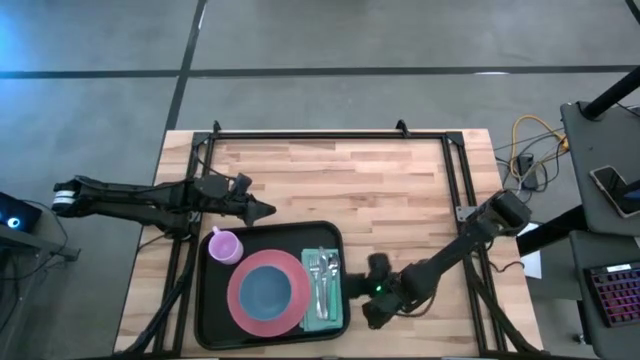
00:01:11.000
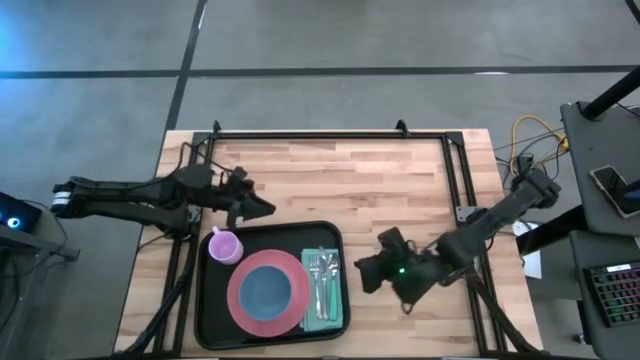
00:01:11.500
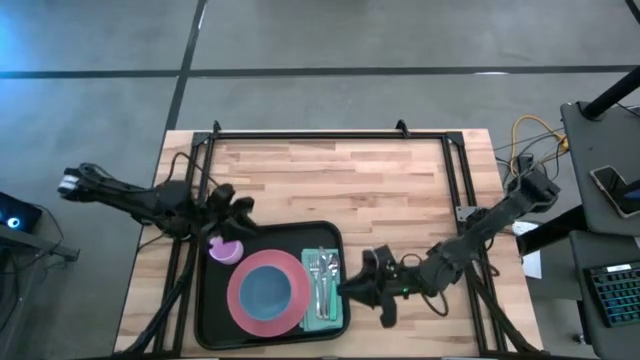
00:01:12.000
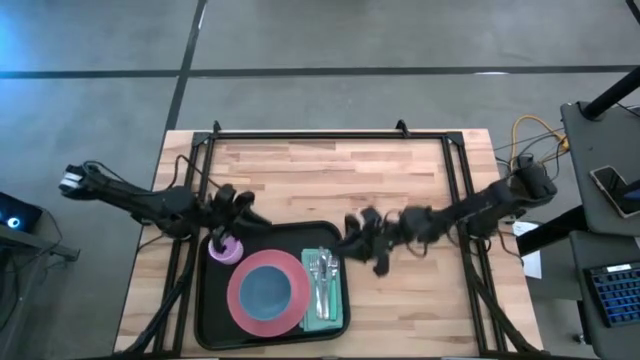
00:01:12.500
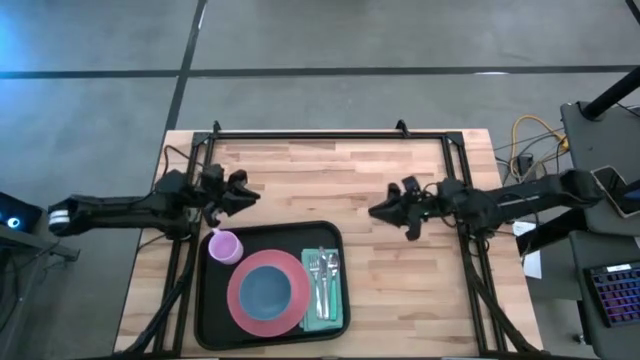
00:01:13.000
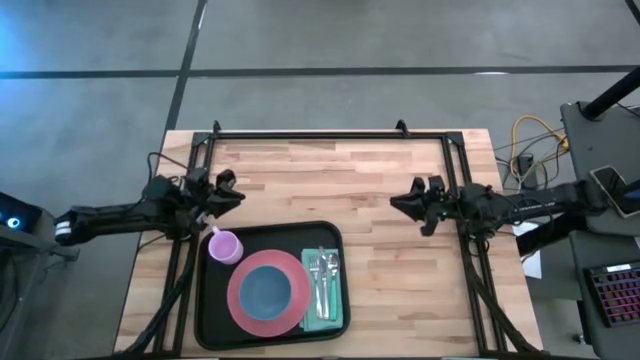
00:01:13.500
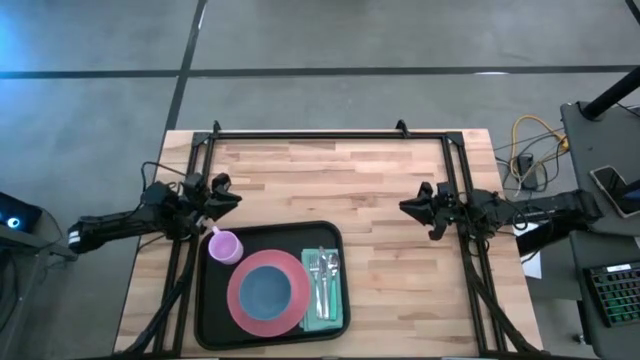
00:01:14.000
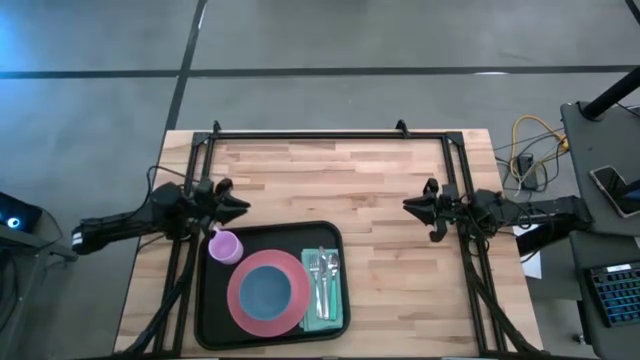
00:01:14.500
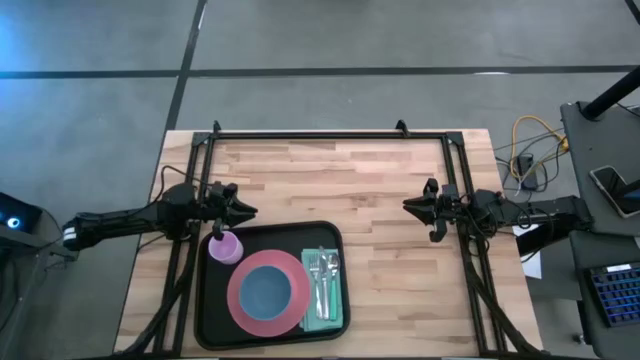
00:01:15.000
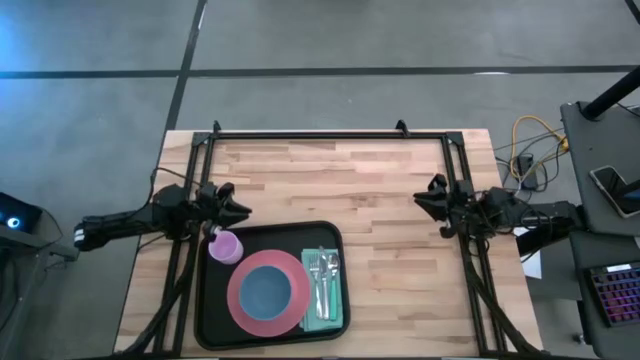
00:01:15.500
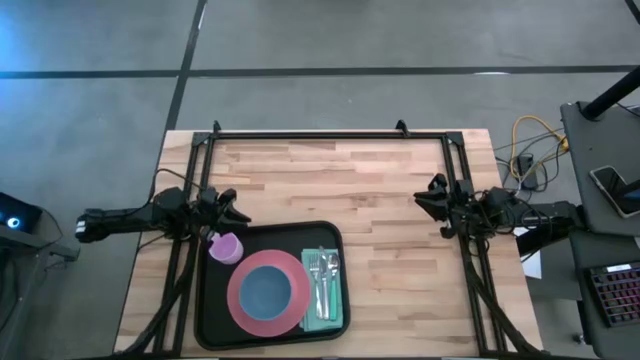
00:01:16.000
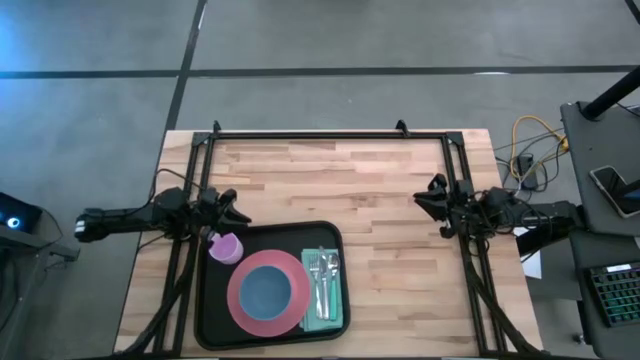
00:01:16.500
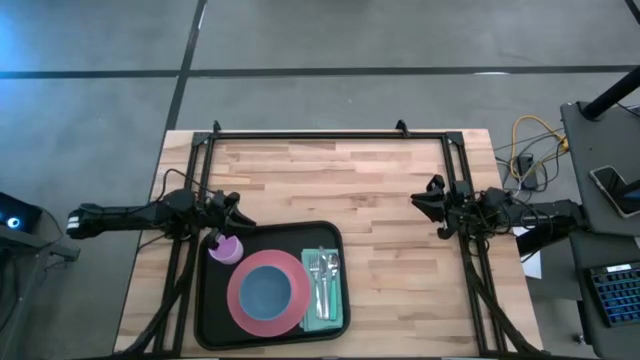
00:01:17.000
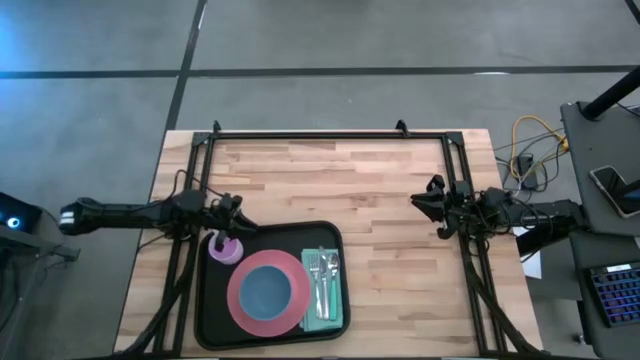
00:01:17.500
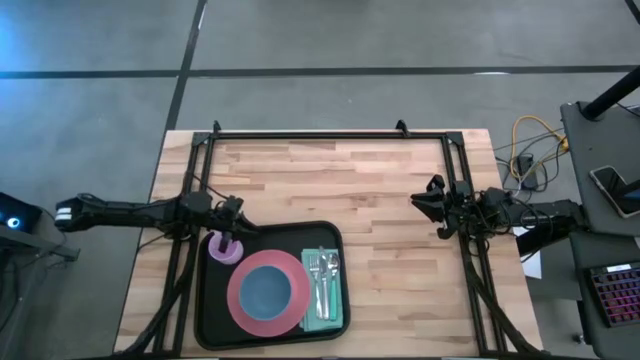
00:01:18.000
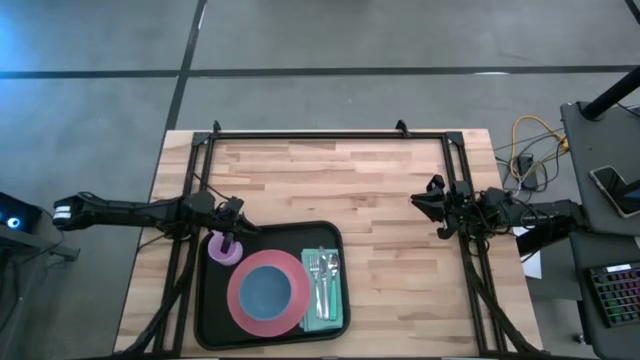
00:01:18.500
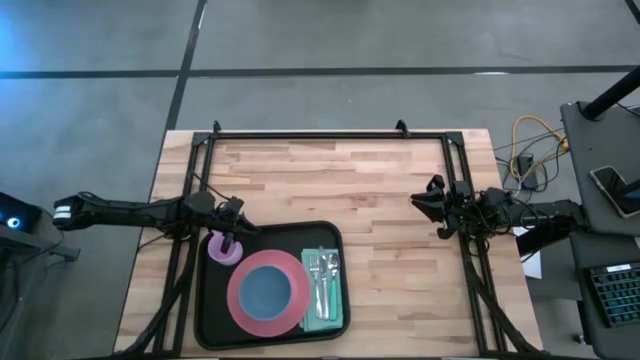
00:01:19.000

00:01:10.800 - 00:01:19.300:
Task: Set up tray
Return to Home Position

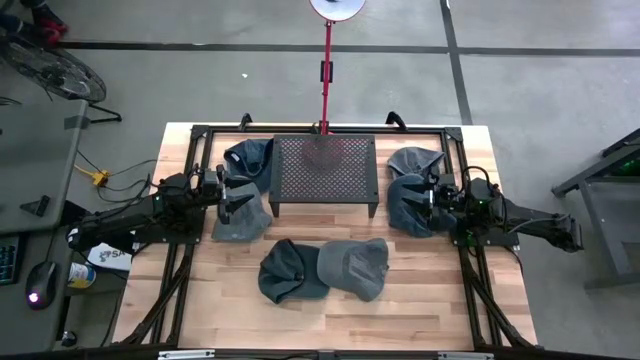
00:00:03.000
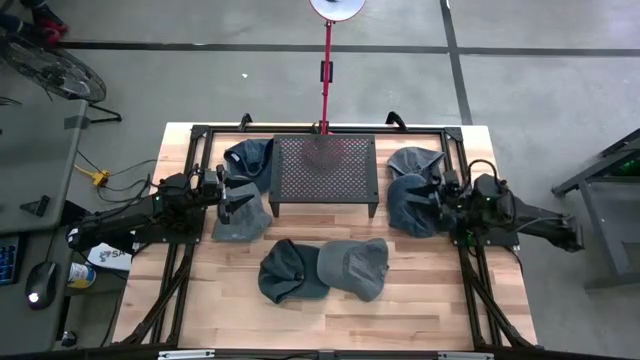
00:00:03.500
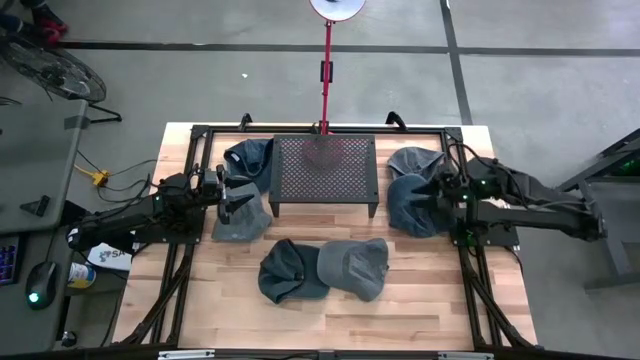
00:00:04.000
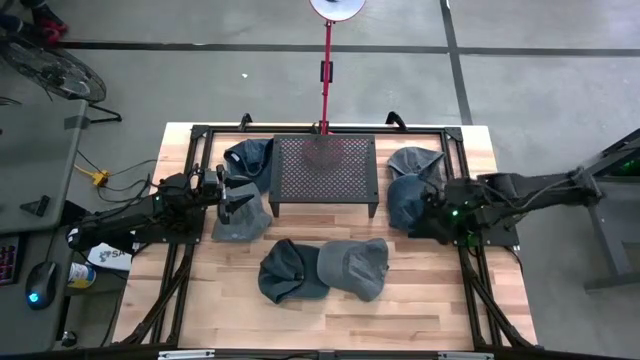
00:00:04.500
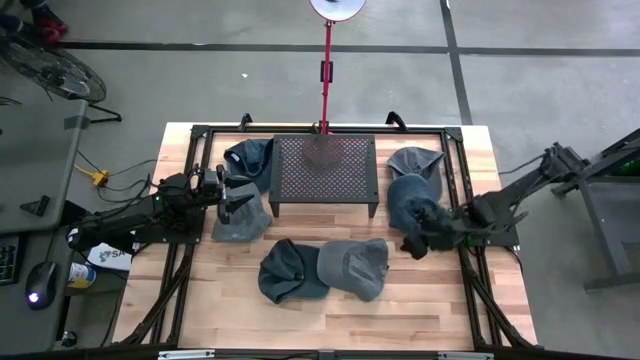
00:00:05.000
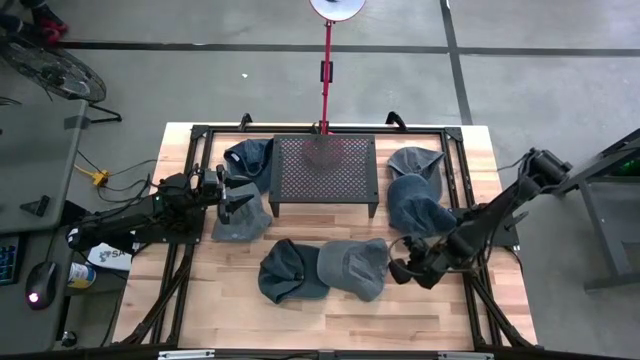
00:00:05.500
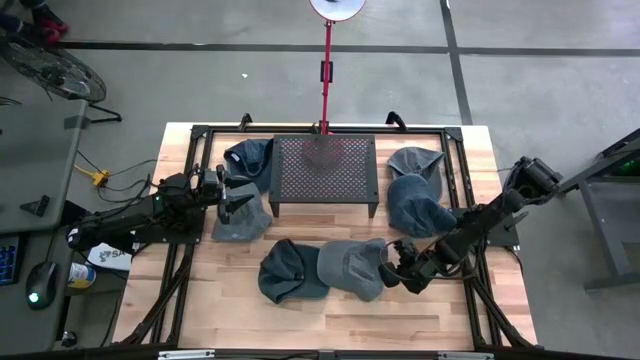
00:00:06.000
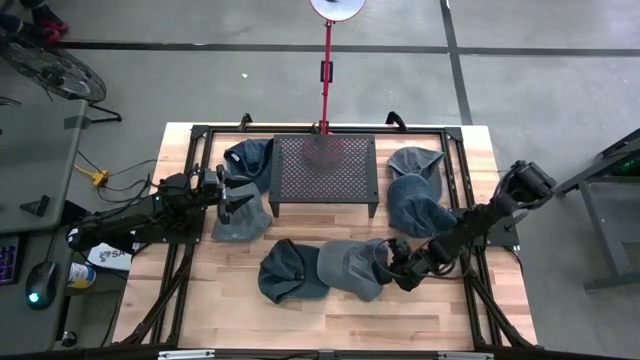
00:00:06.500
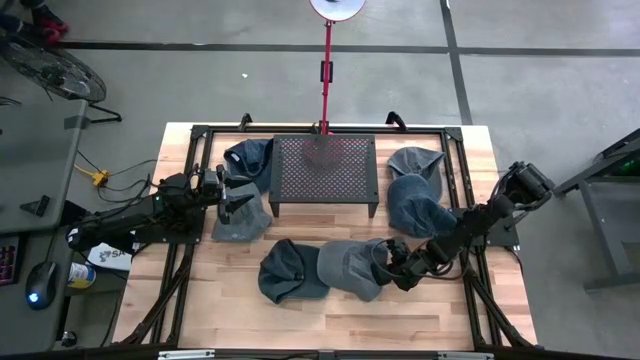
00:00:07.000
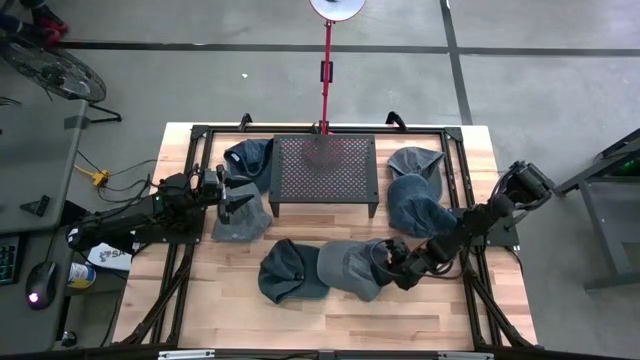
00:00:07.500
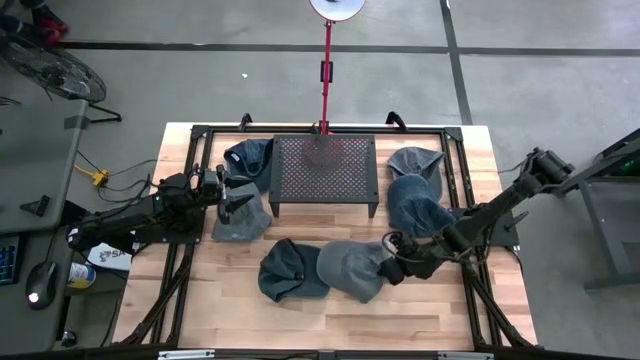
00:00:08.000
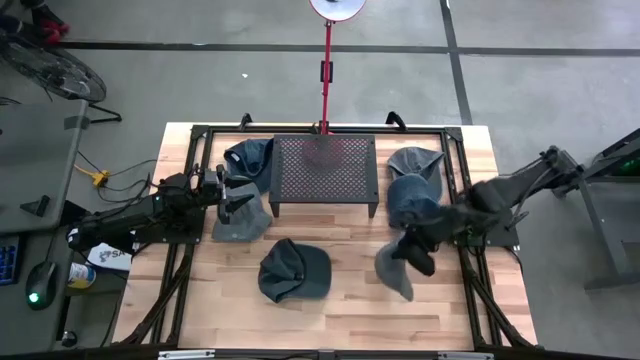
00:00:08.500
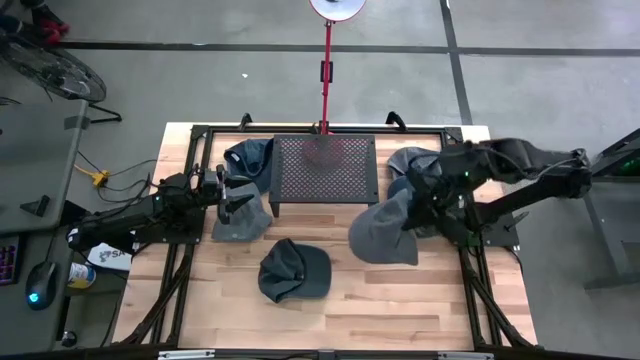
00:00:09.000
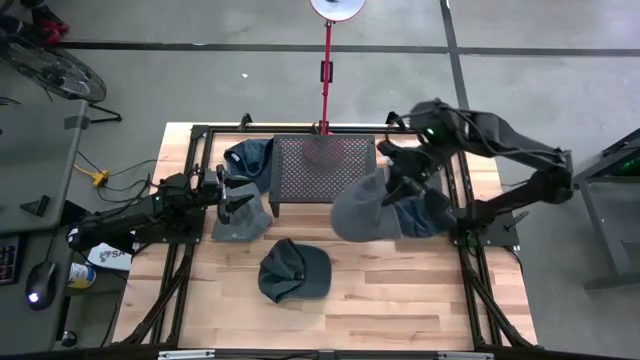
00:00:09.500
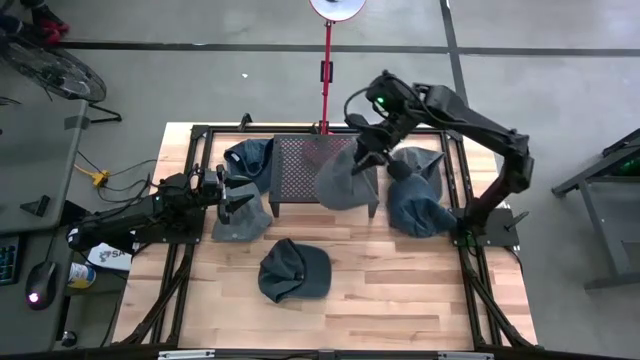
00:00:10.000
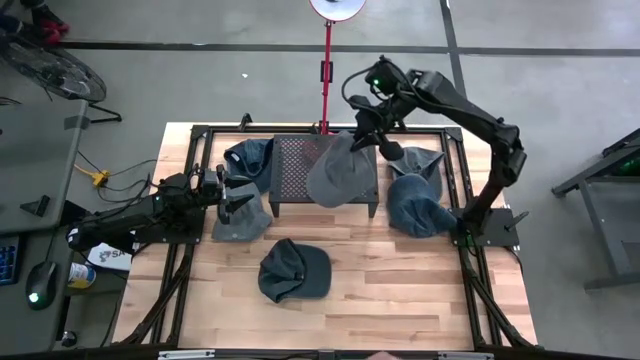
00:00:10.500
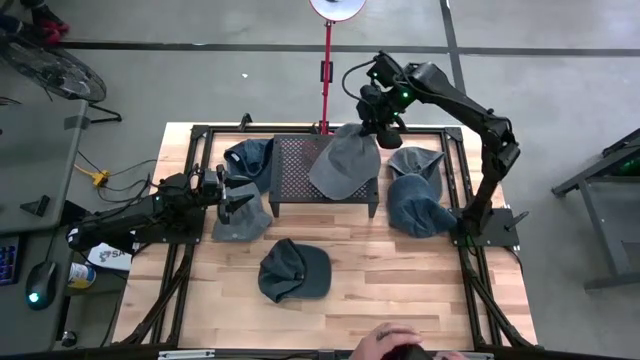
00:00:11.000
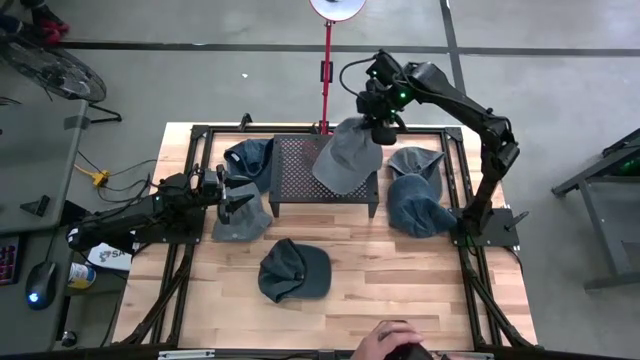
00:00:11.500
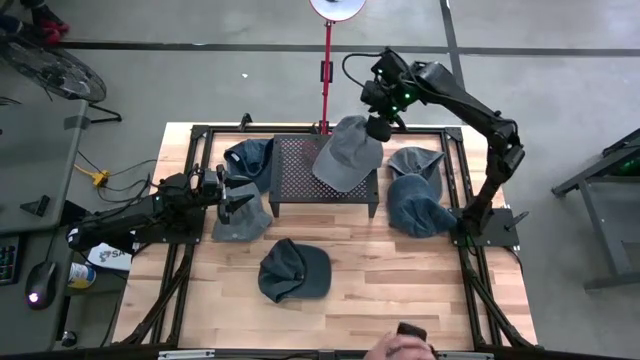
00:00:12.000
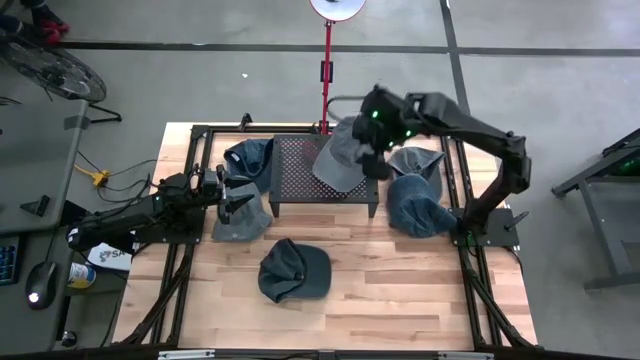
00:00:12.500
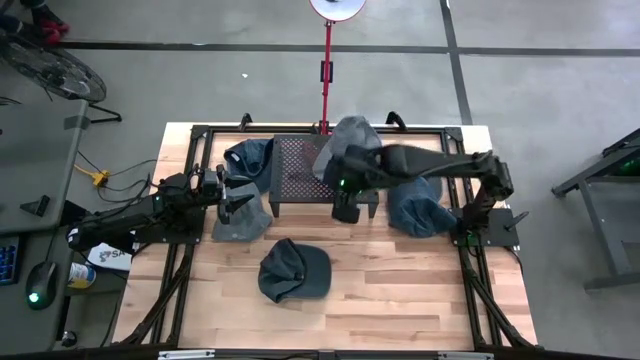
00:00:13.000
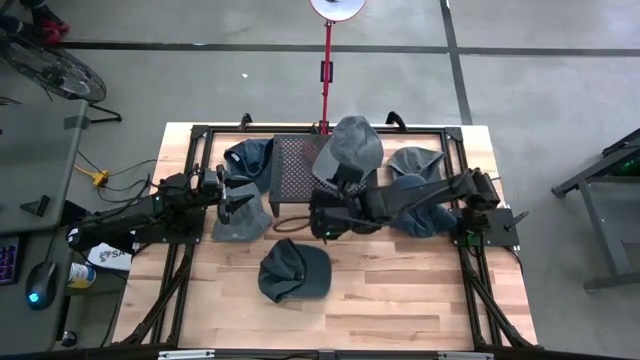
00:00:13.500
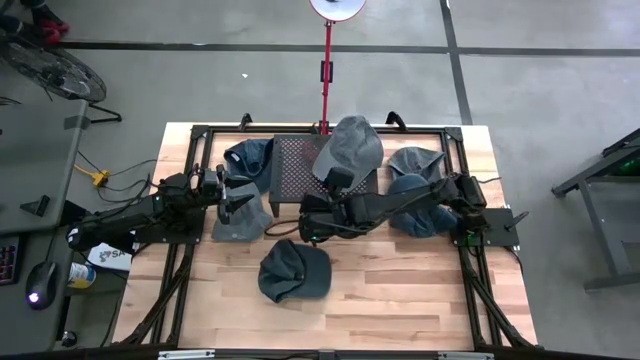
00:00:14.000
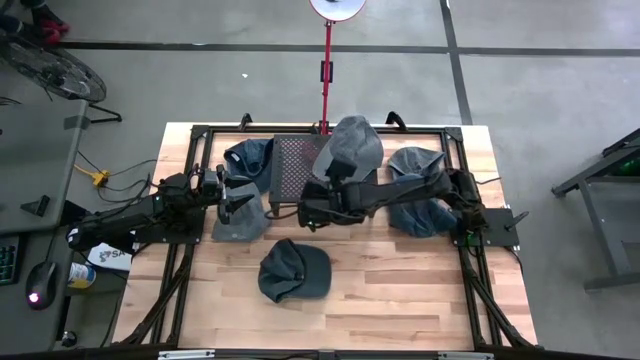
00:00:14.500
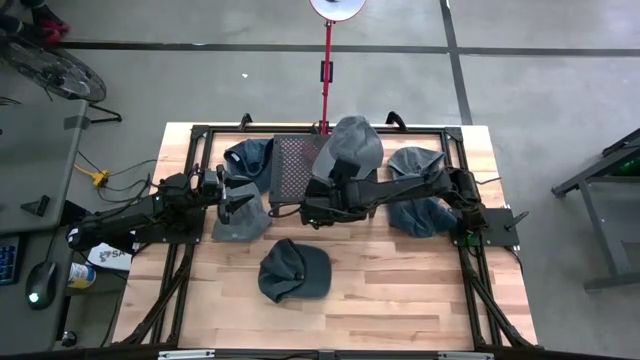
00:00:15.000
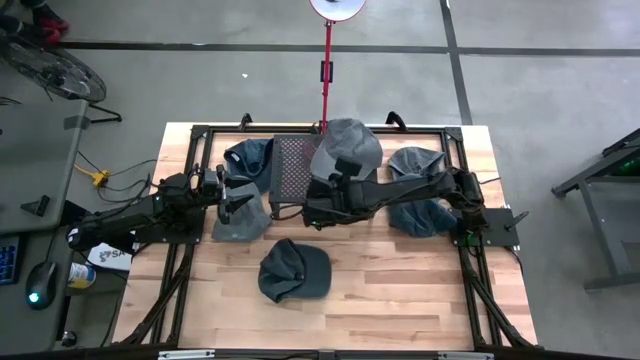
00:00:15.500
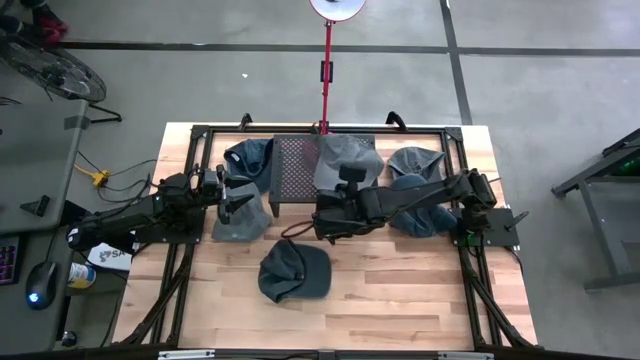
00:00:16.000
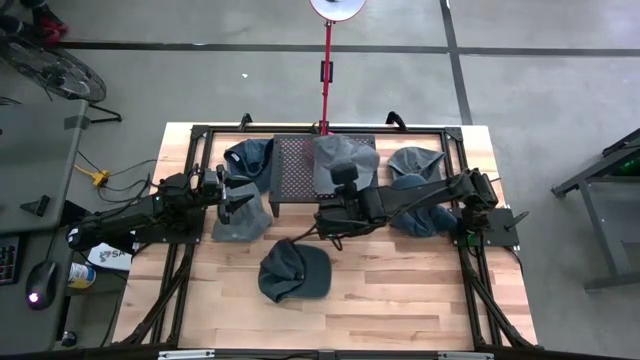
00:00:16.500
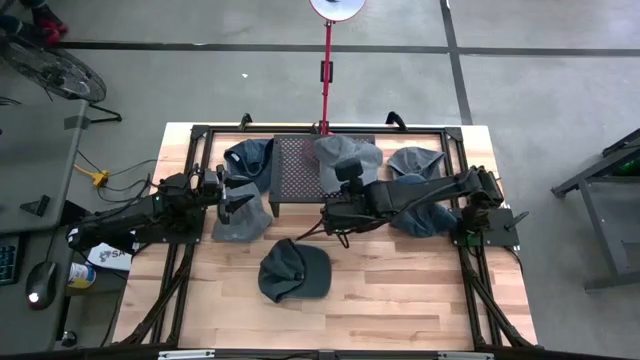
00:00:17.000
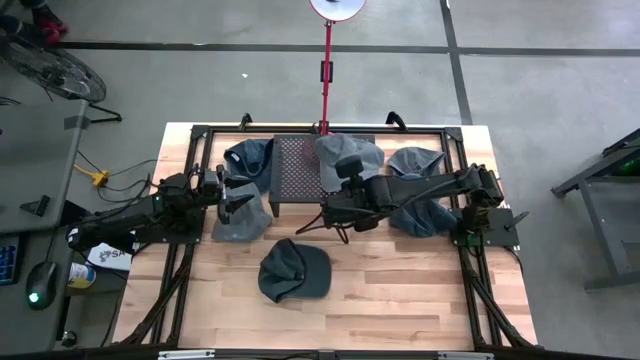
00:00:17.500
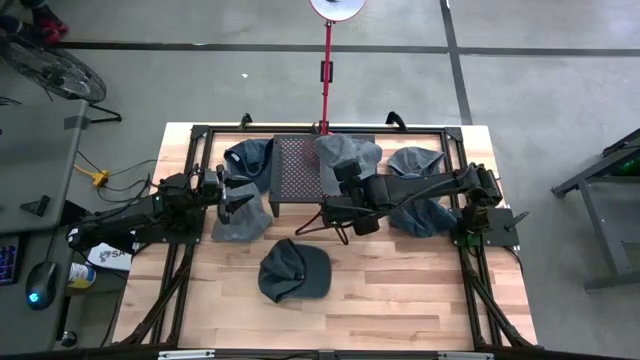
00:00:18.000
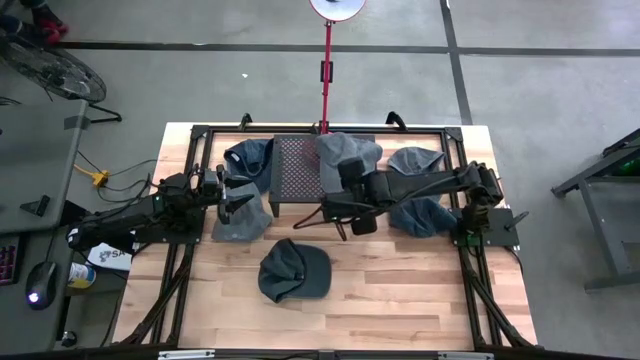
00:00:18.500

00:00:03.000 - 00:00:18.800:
Task: Pick & Place hat
Put the lower right gray cap on the shelf
